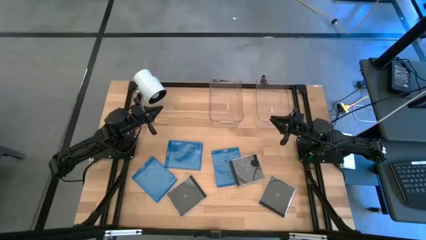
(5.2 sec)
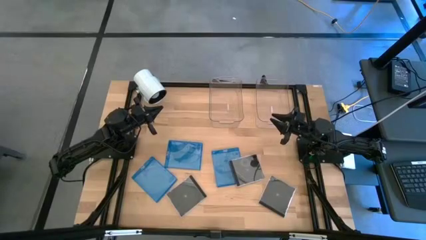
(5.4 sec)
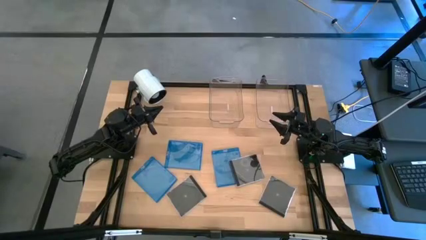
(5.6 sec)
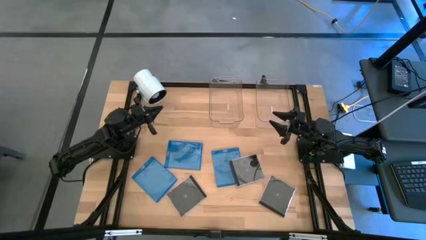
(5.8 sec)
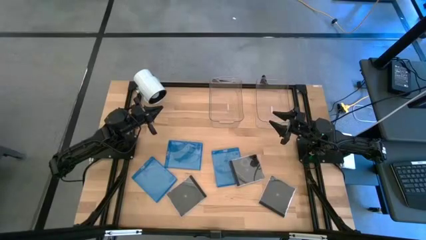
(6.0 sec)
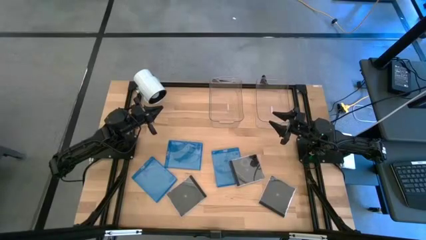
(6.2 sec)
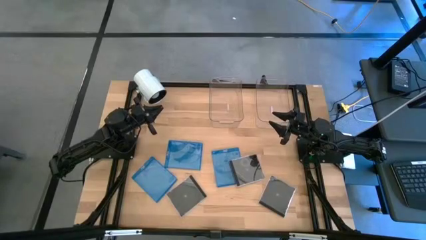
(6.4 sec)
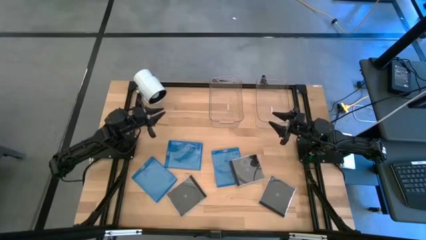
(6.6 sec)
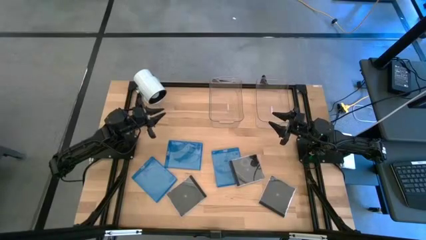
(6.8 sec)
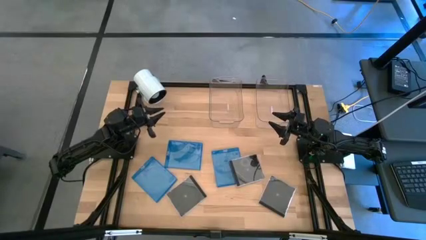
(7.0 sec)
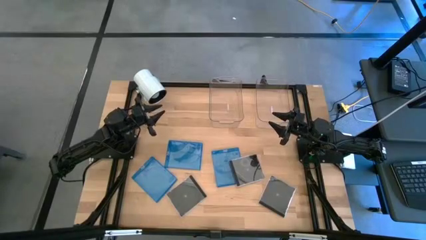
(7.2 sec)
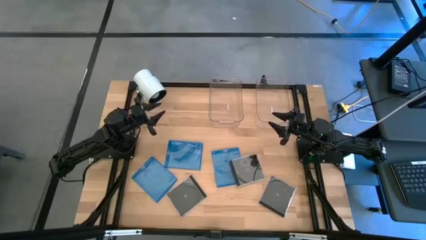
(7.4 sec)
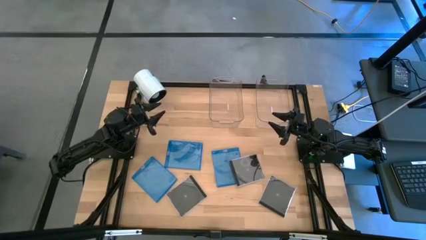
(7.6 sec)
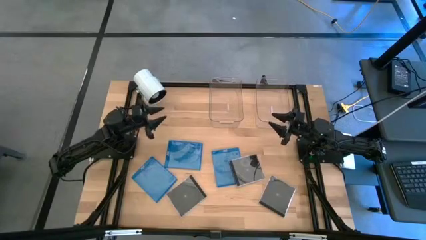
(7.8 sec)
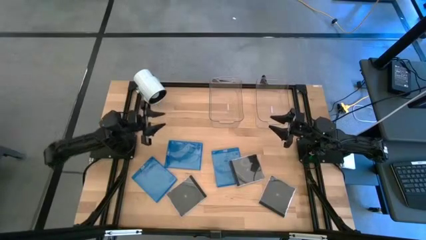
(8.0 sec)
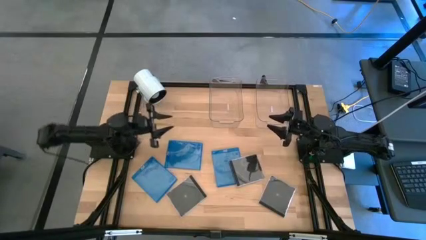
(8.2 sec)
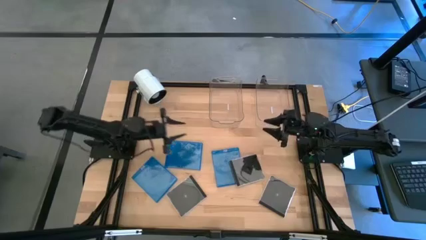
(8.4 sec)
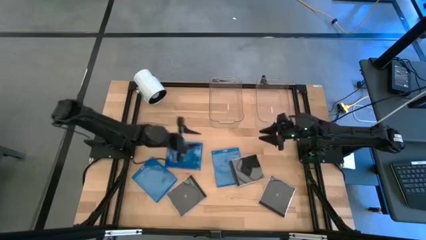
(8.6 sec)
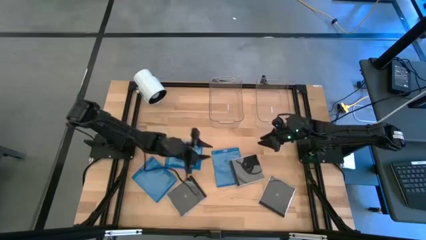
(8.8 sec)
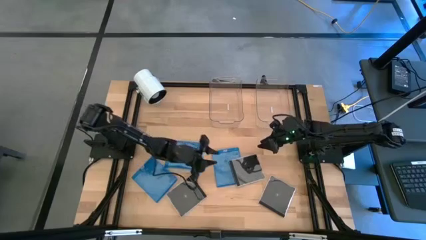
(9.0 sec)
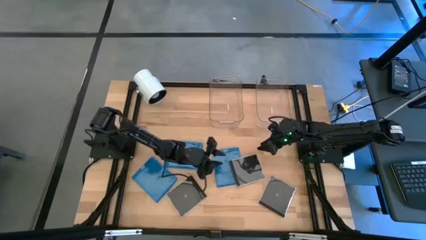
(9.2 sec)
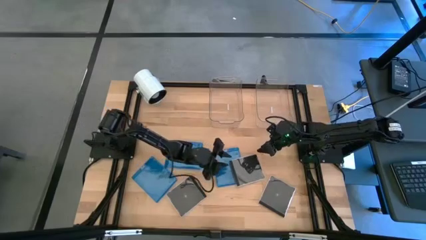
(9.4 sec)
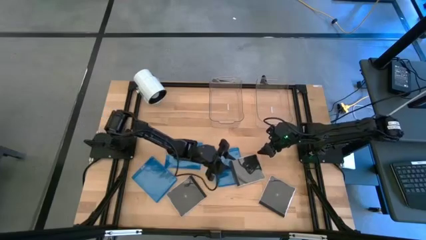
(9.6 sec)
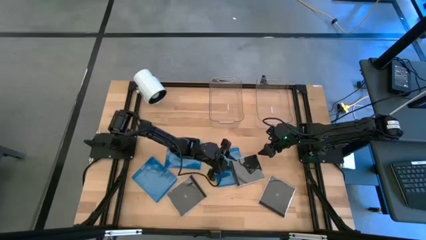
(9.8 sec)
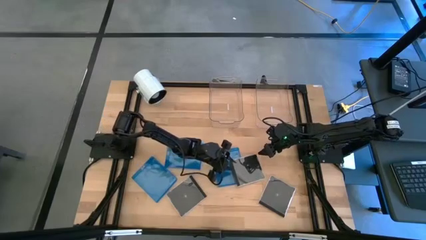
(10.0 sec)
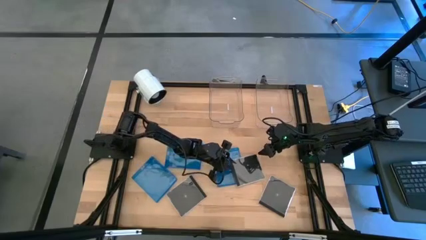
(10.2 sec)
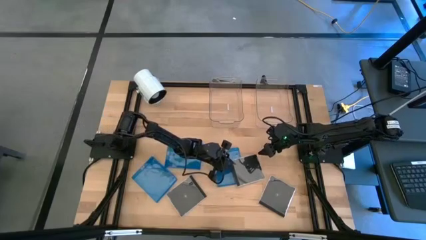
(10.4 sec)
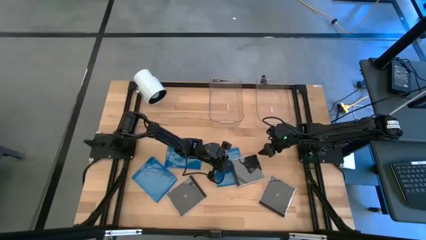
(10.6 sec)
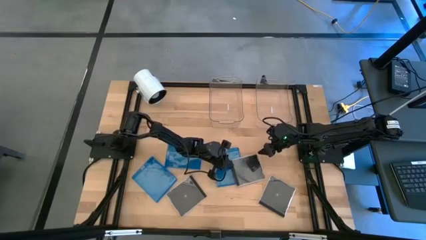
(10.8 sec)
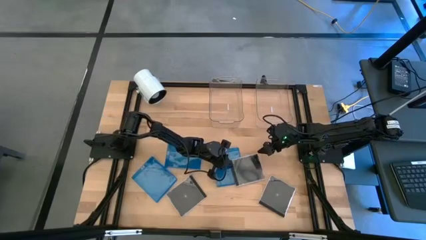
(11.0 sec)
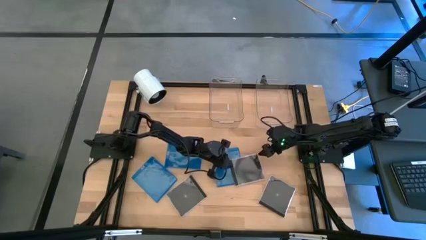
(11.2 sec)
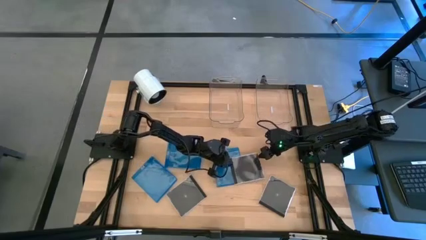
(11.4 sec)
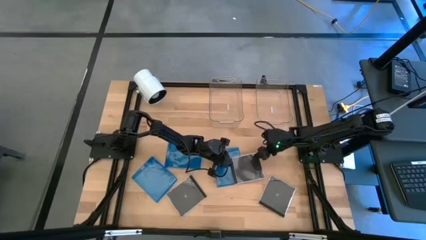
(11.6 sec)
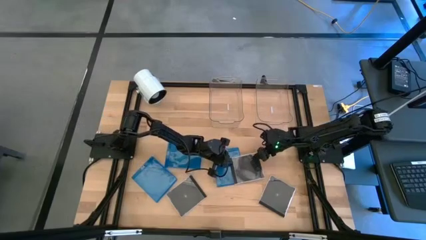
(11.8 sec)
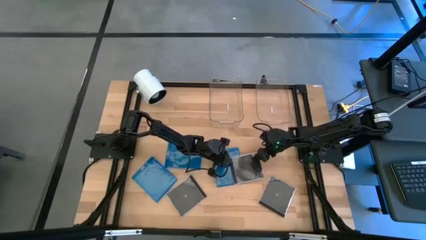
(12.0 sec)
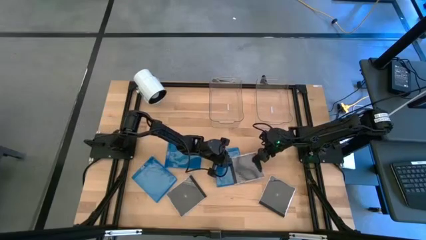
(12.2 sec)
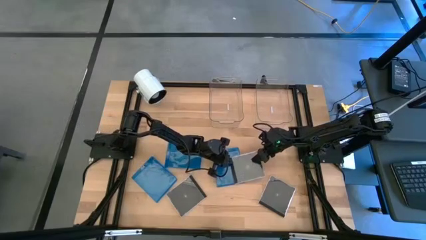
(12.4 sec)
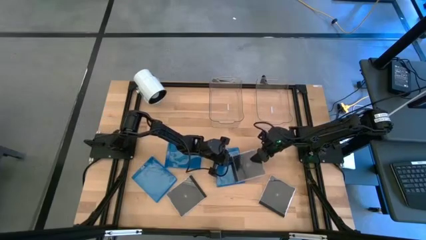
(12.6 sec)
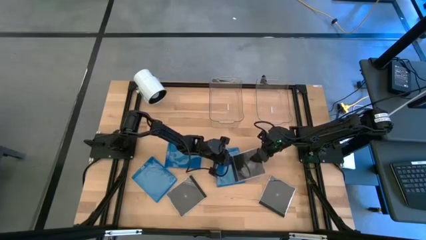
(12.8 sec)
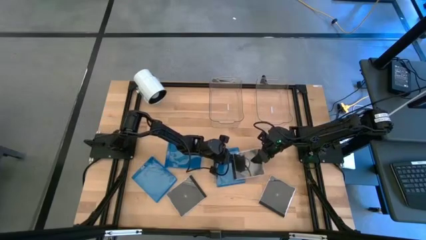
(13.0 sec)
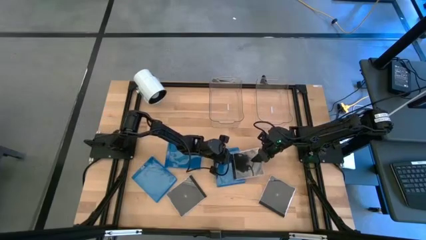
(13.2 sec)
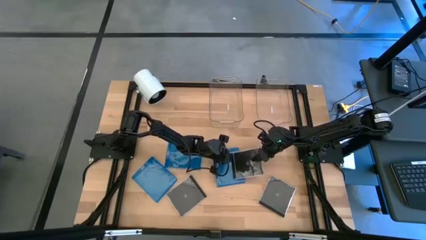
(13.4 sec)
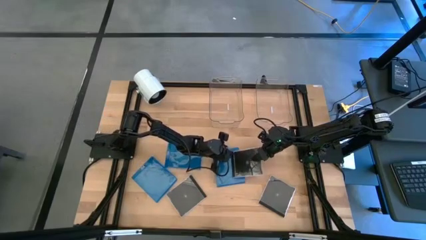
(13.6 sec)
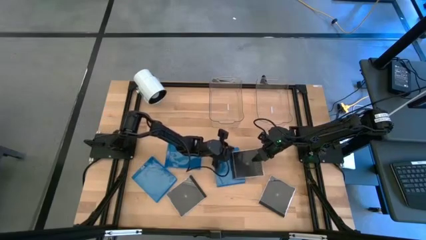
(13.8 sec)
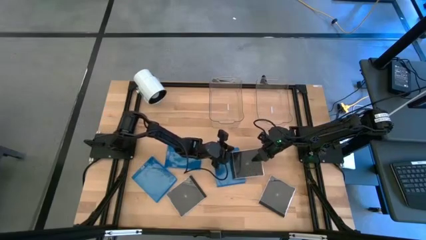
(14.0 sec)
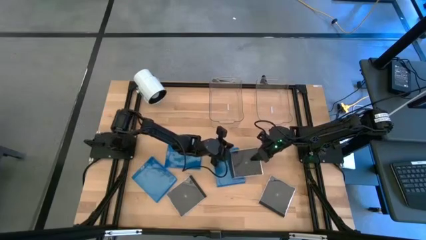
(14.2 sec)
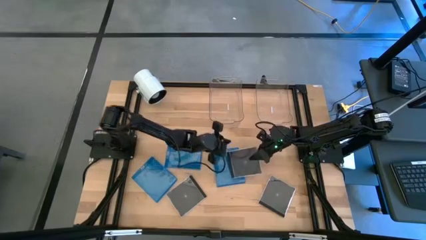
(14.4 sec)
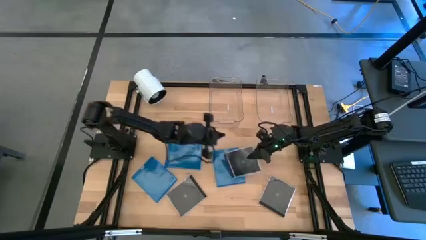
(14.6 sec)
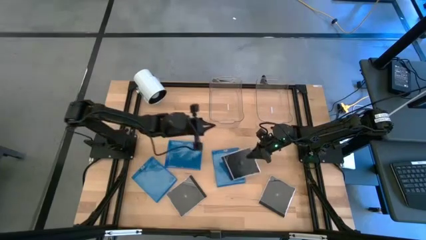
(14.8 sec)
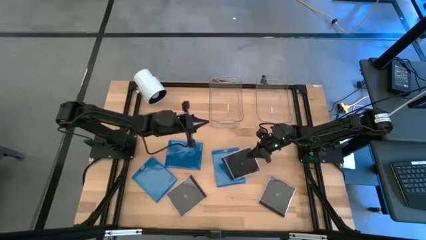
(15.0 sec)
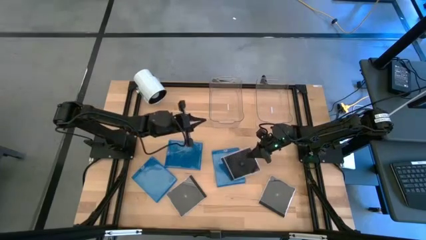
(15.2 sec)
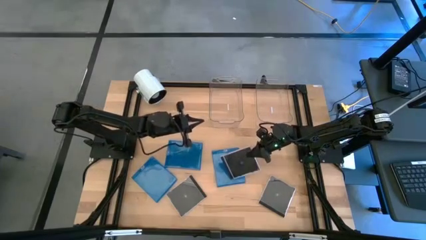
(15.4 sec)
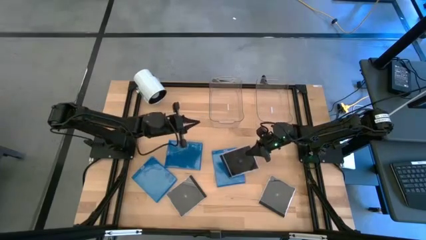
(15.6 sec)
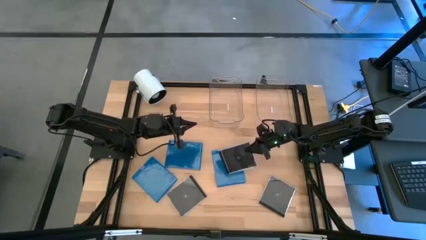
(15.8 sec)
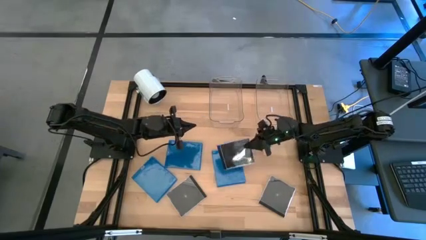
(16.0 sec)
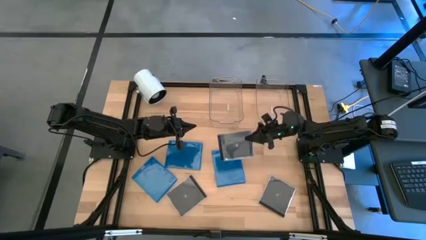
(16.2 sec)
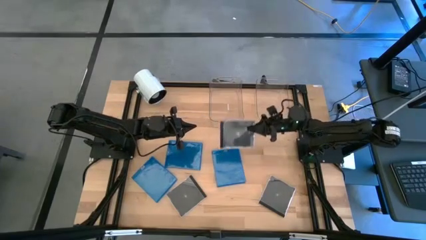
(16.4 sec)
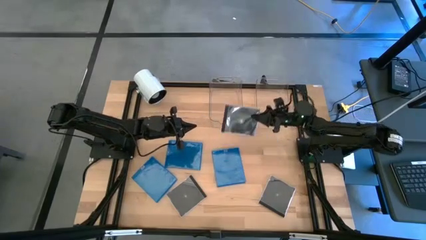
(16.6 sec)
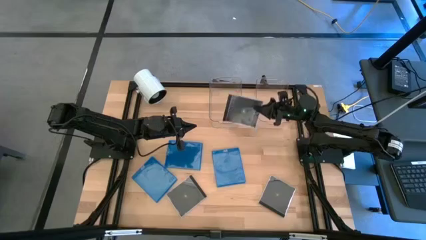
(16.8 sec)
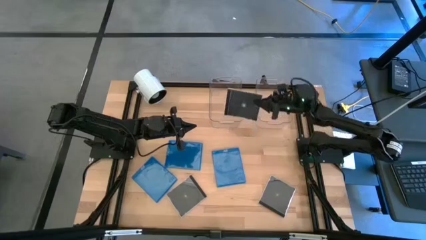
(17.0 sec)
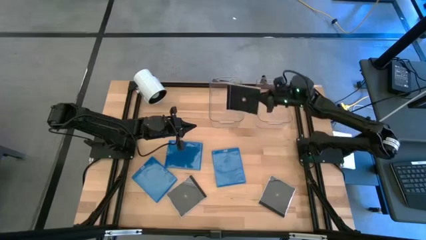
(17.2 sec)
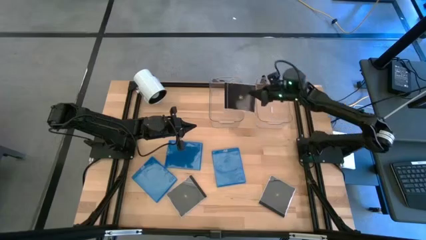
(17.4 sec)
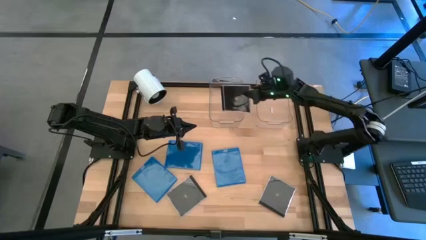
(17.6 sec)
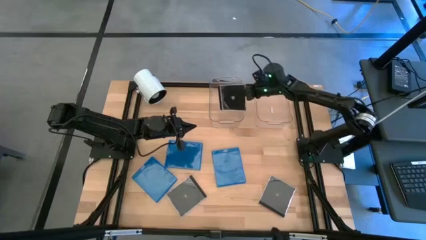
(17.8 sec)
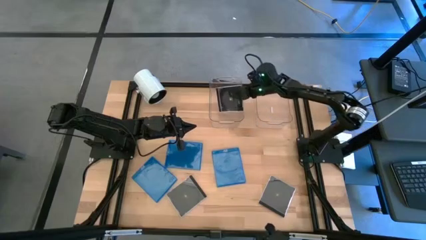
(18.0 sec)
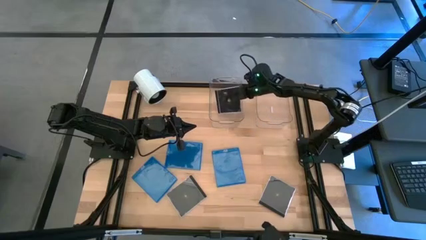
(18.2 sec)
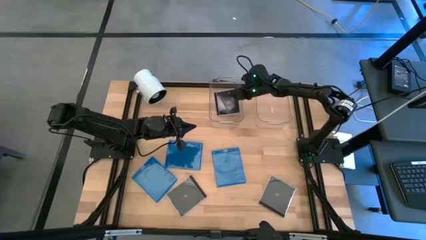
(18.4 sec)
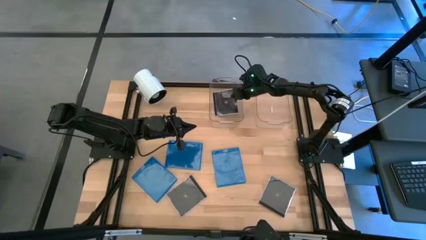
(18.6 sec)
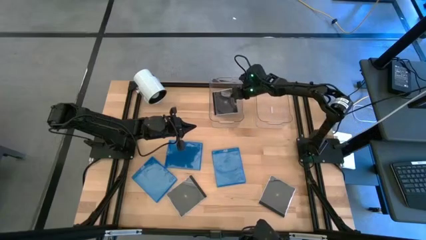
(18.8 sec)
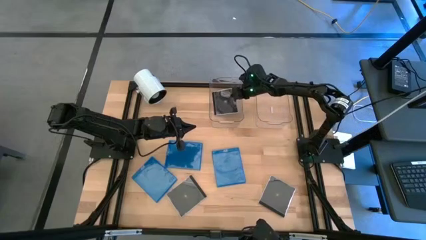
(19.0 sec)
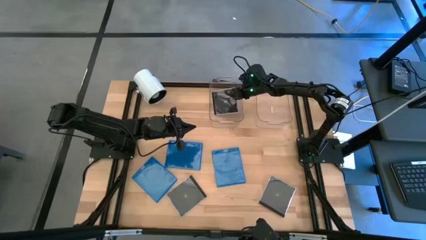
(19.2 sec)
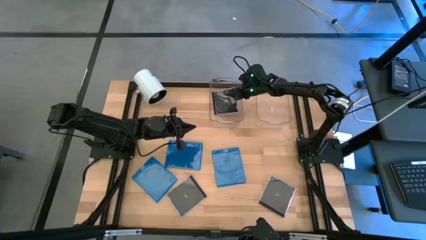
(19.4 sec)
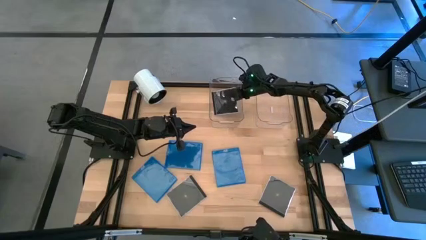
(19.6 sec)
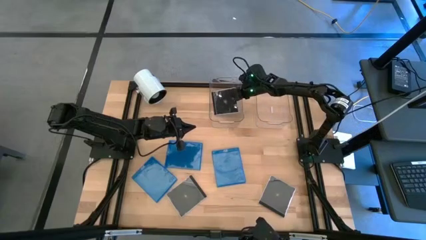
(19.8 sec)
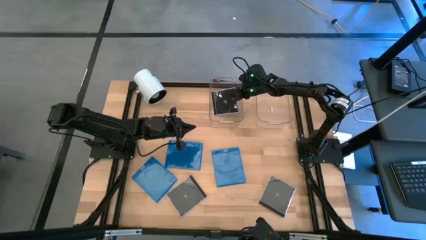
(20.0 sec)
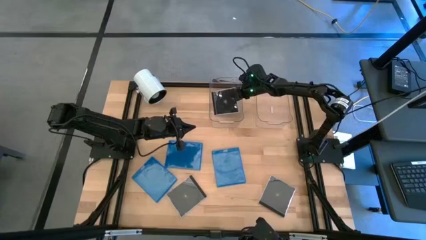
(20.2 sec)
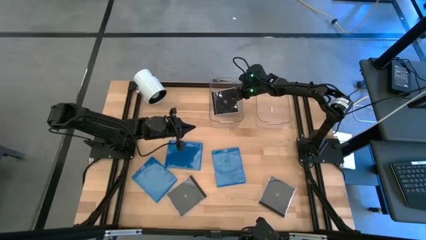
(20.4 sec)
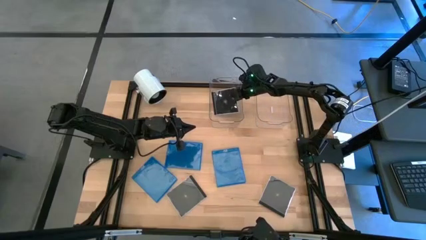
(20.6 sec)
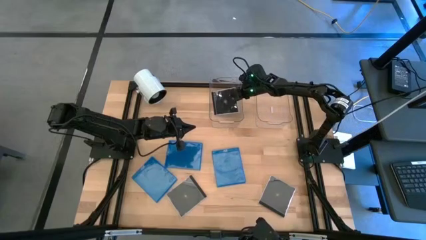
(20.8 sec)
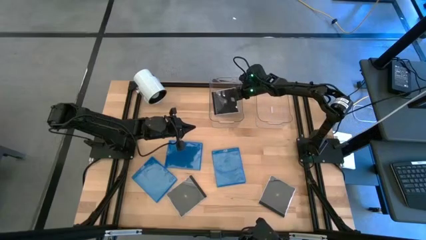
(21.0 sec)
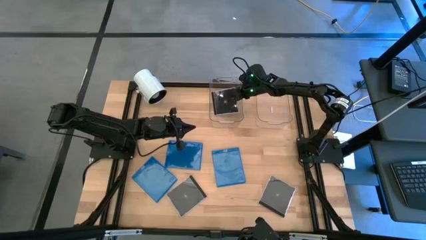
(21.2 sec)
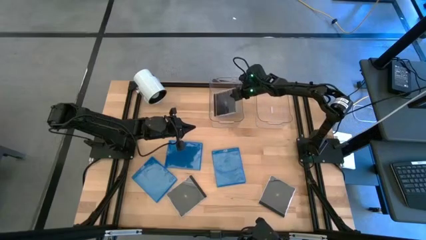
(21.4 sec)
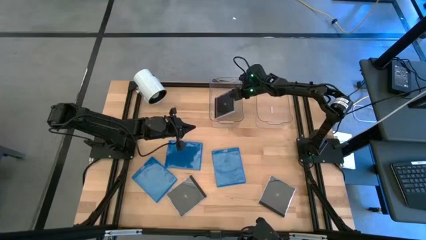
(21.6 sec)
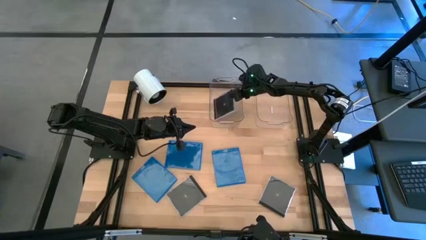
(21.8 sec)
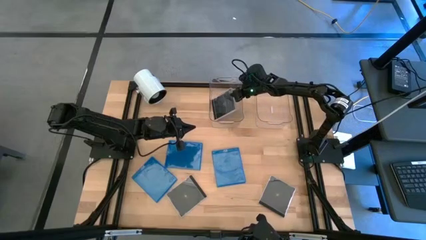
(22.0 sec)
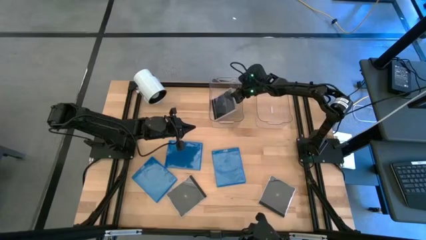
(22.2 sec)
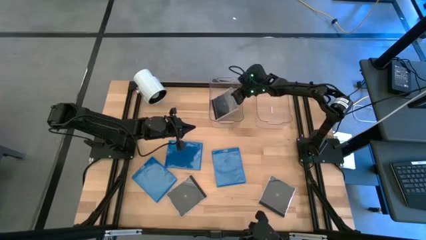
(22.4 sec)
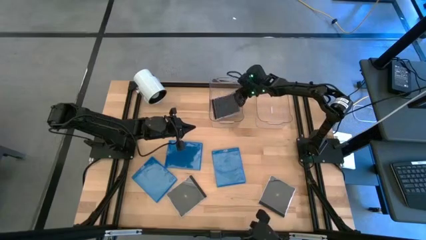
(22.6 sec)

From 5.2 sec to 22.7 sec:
Task: Pick & place jewel cases by type
Put the center black CD case into the left transparent bin
